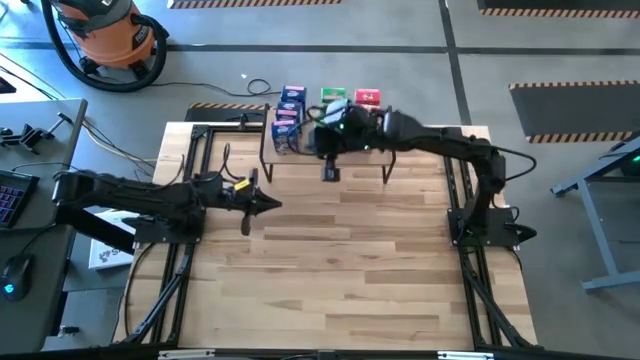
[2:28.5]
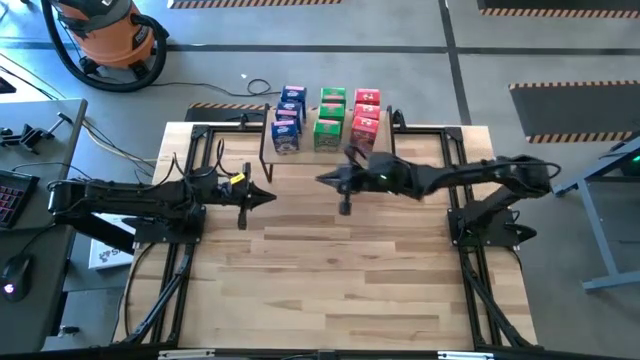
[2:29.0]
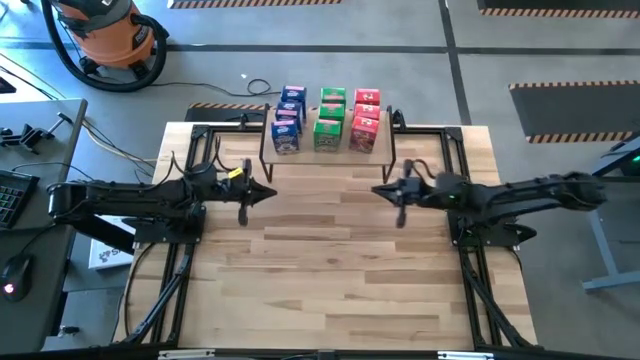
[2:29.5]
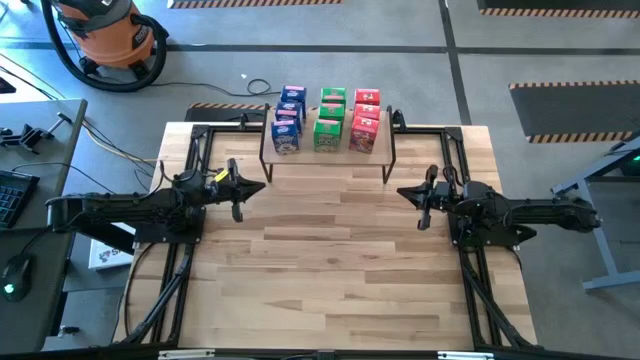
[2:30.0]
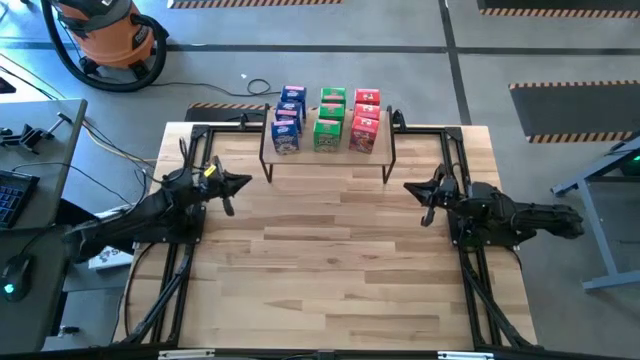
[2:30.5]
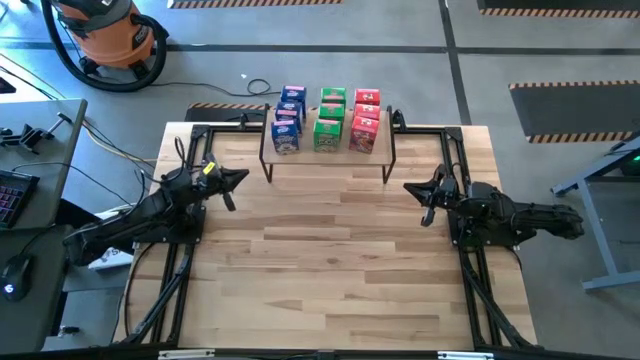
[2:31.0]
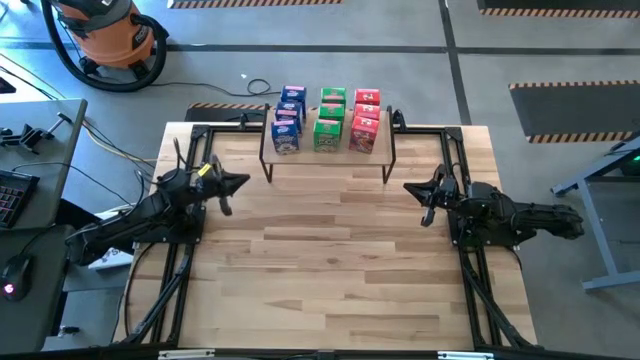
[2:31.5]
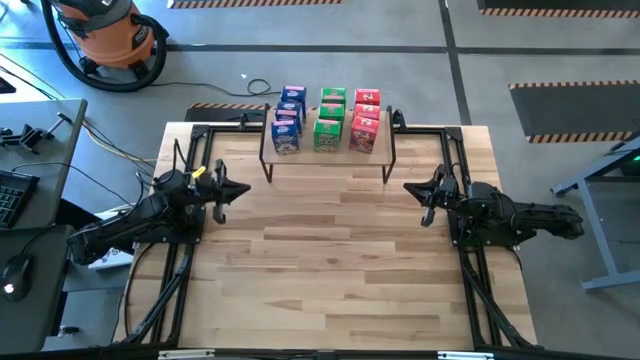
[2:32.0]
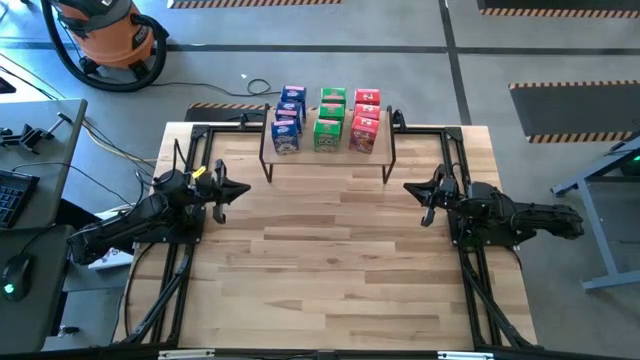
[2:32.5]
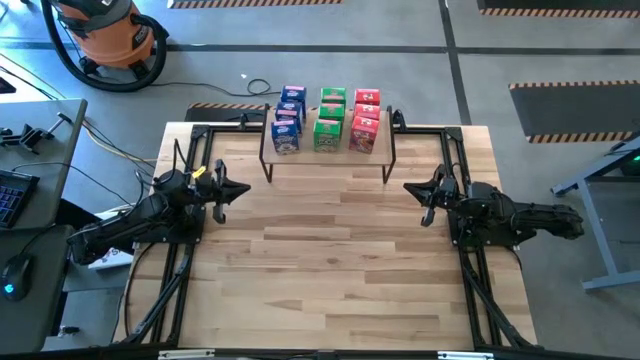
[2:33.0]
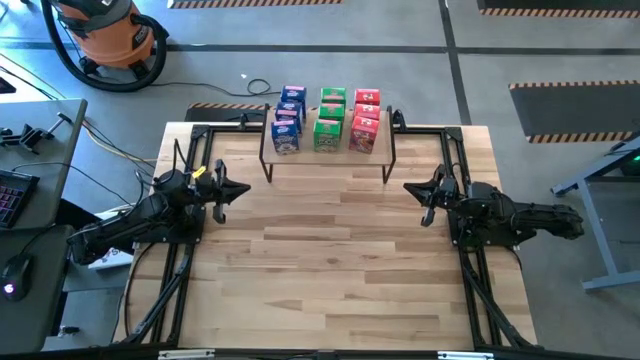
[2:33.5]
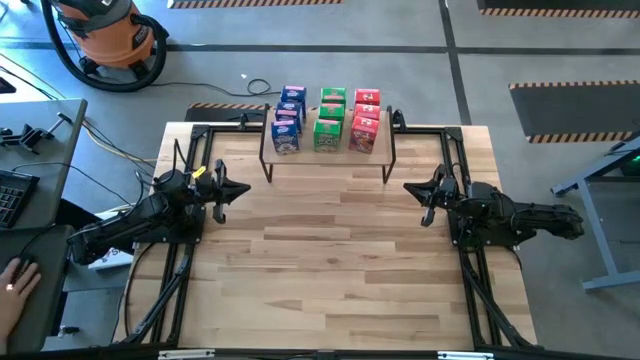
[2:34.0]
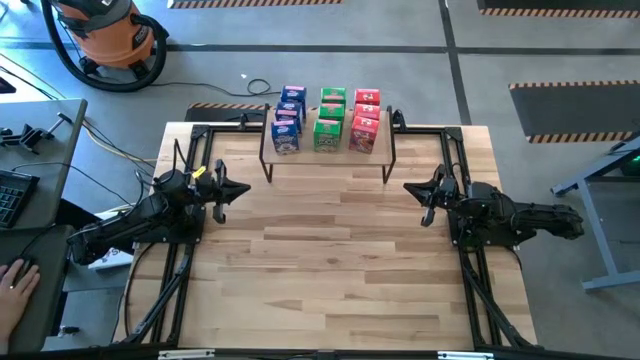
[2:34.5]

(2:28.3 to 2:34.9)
Task: Stack cereal on shelf
Return to Home Position

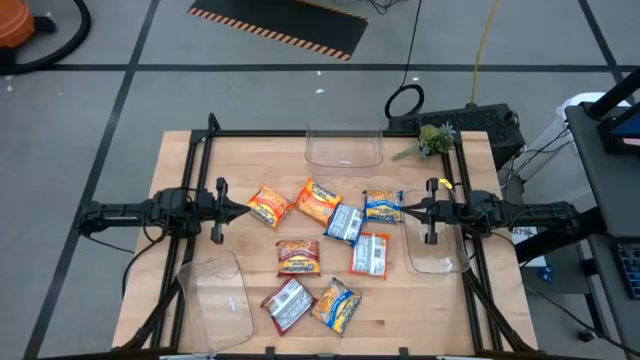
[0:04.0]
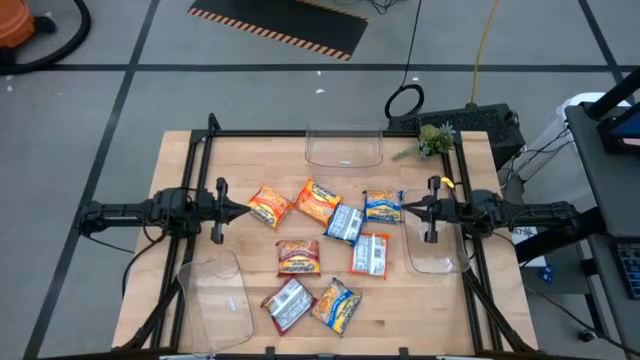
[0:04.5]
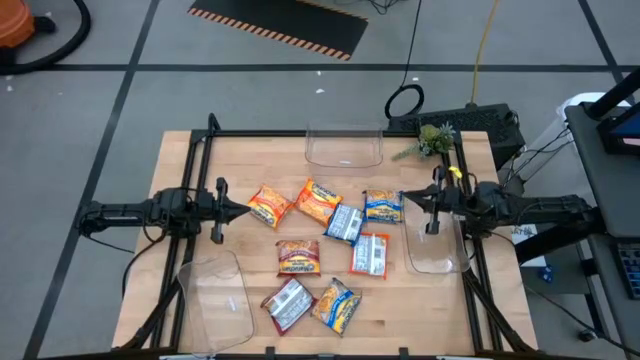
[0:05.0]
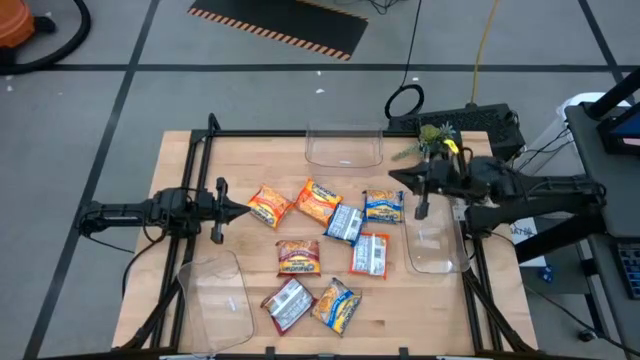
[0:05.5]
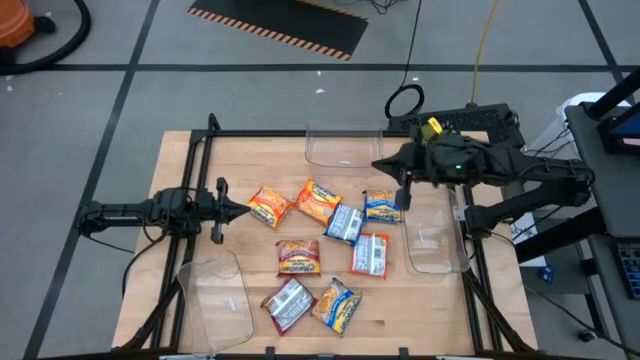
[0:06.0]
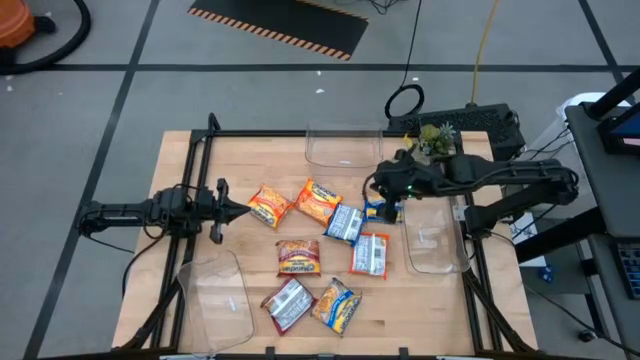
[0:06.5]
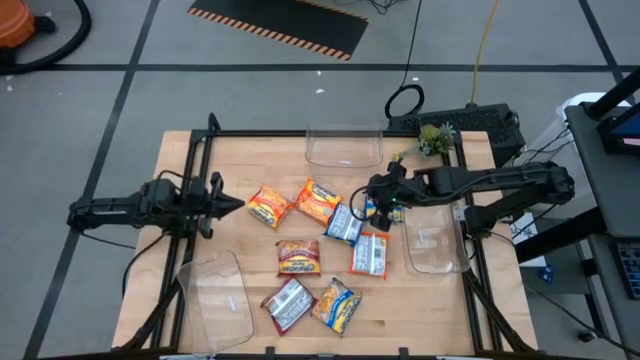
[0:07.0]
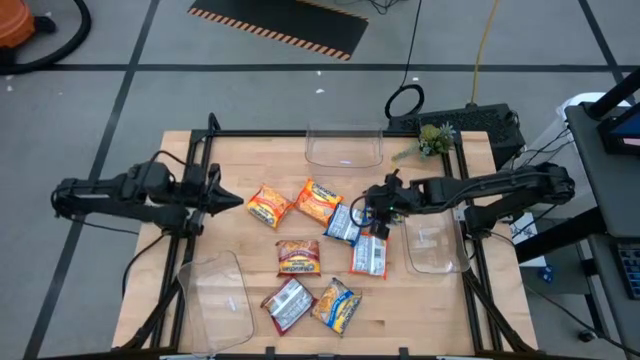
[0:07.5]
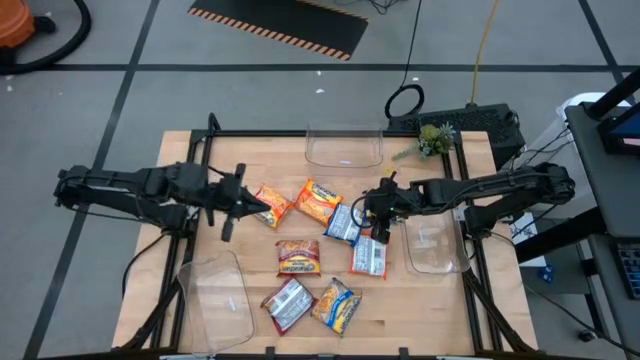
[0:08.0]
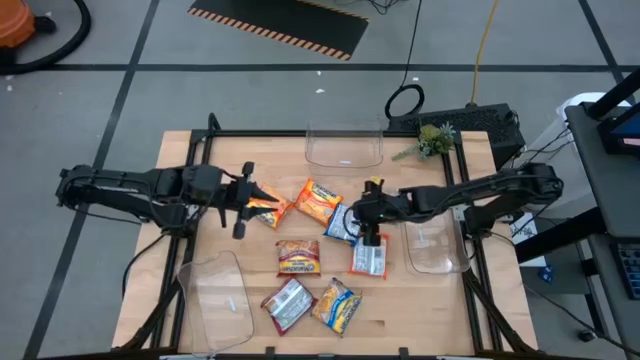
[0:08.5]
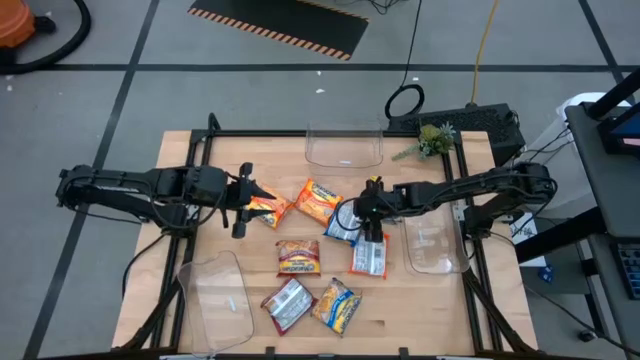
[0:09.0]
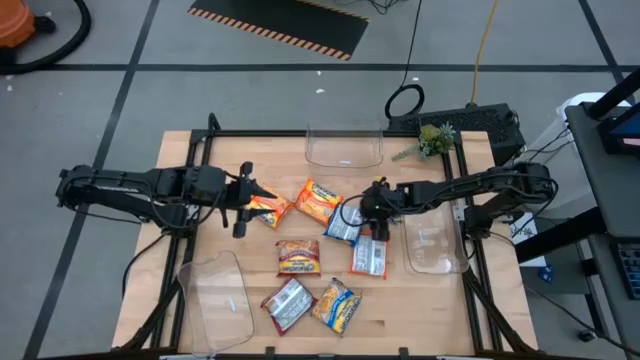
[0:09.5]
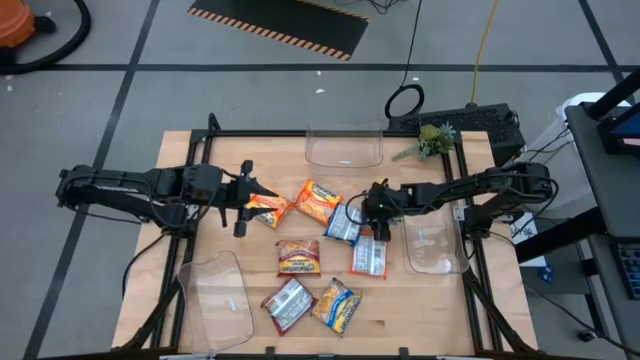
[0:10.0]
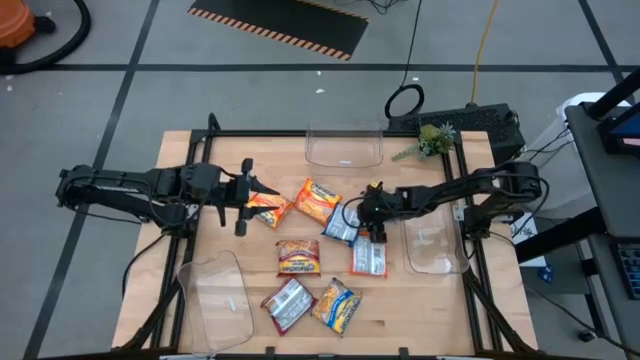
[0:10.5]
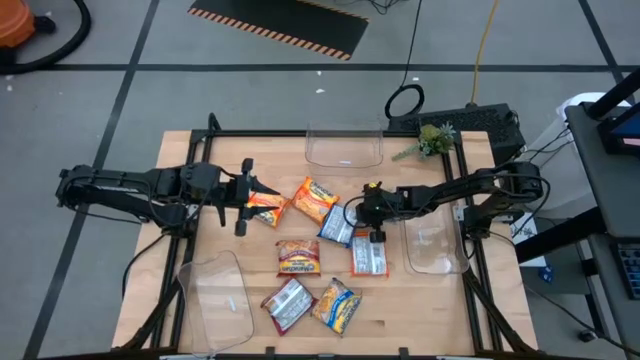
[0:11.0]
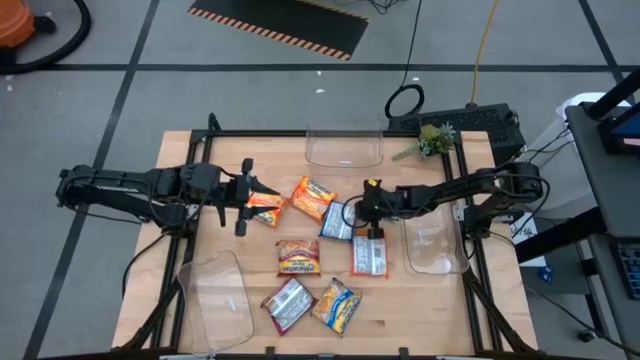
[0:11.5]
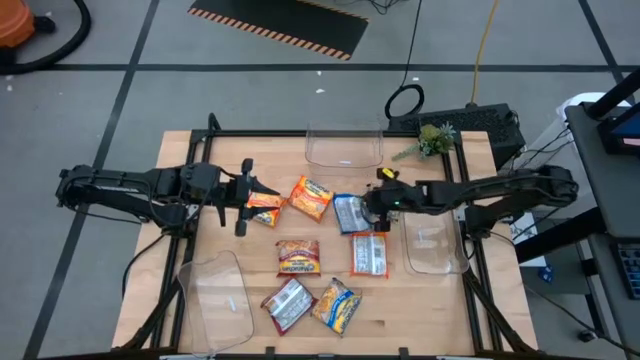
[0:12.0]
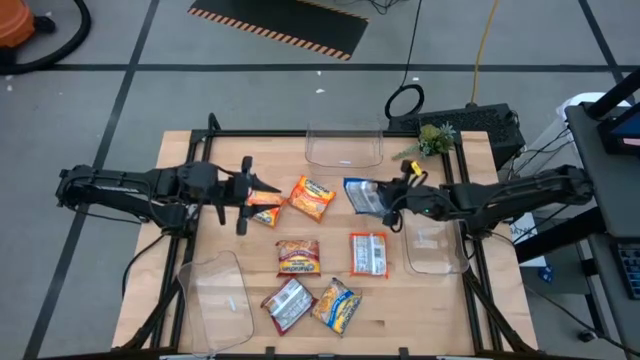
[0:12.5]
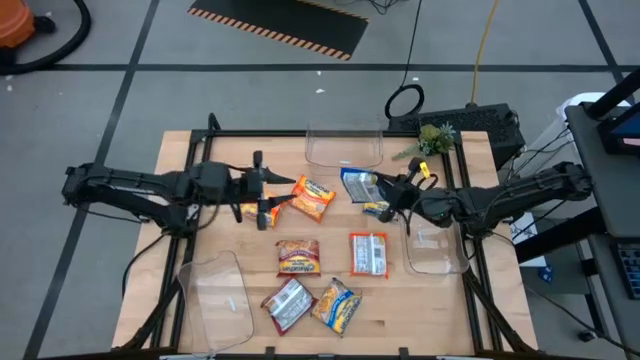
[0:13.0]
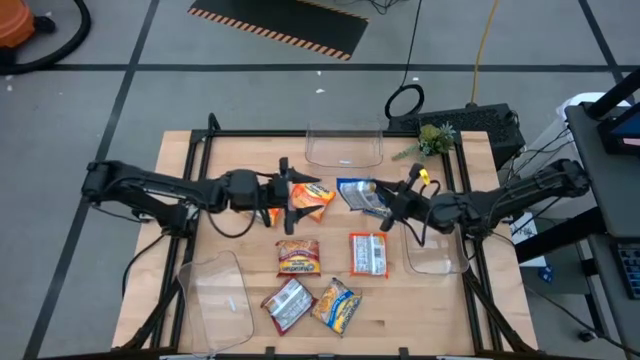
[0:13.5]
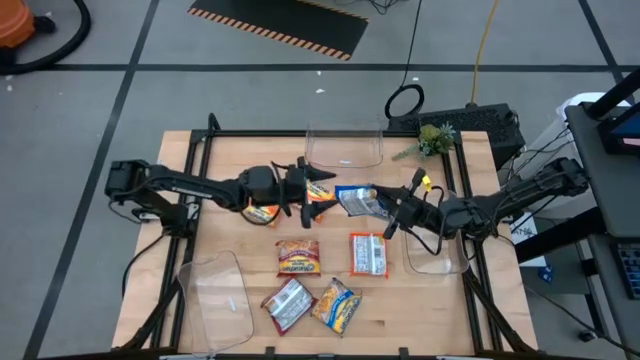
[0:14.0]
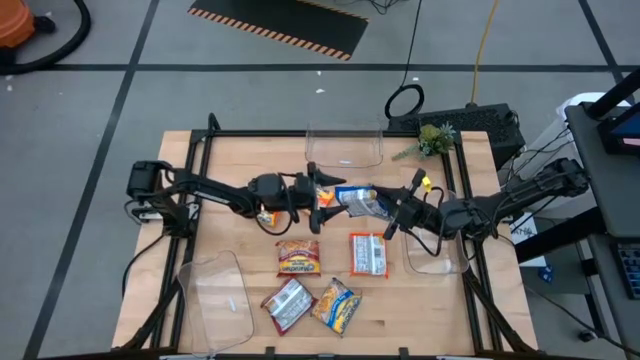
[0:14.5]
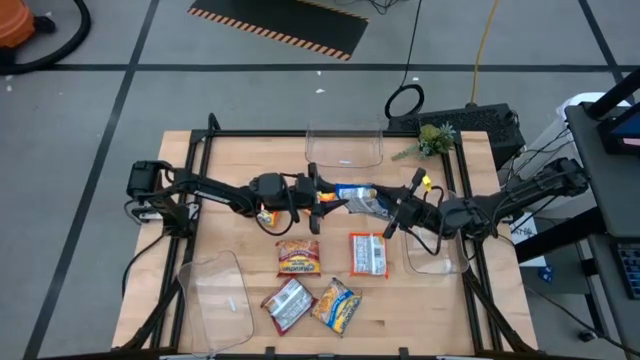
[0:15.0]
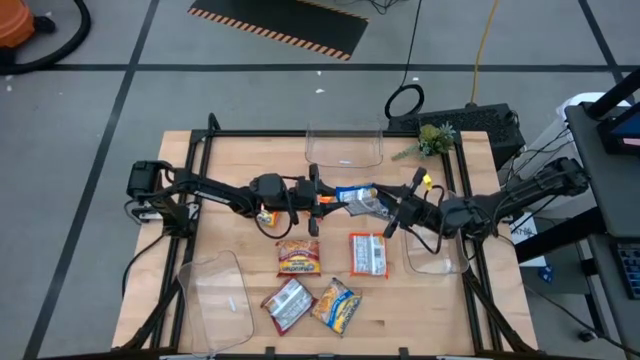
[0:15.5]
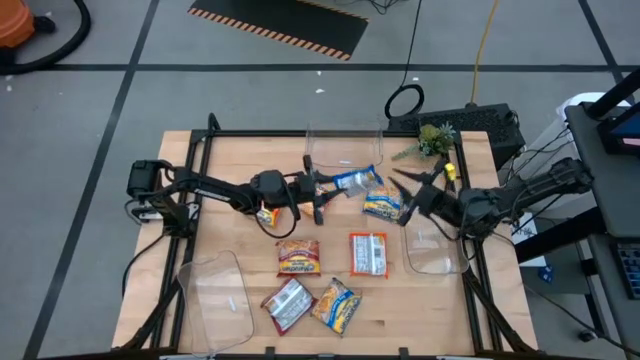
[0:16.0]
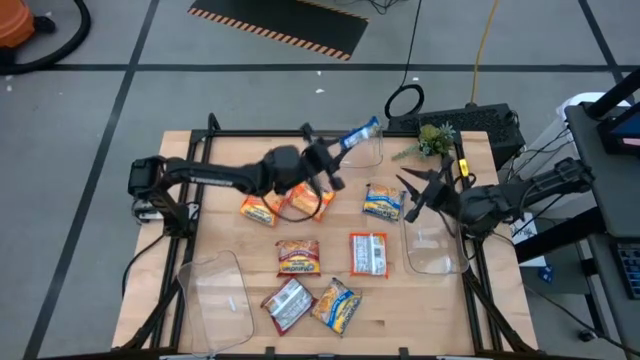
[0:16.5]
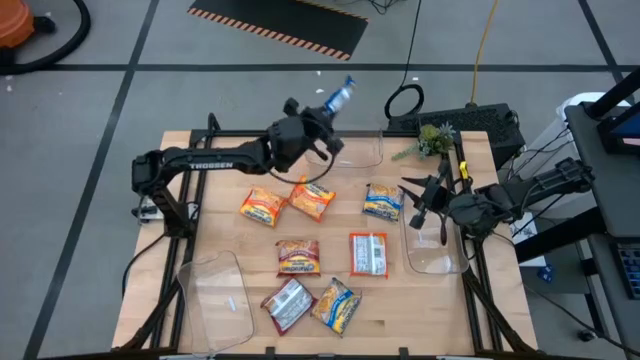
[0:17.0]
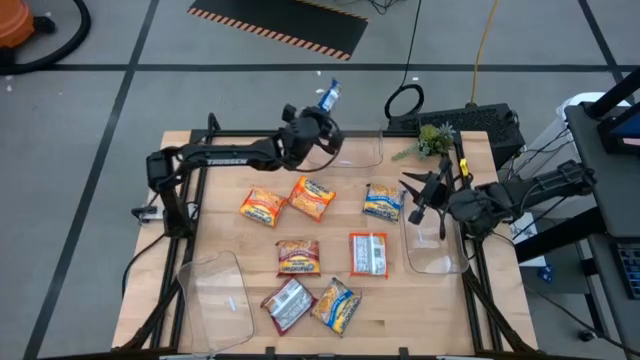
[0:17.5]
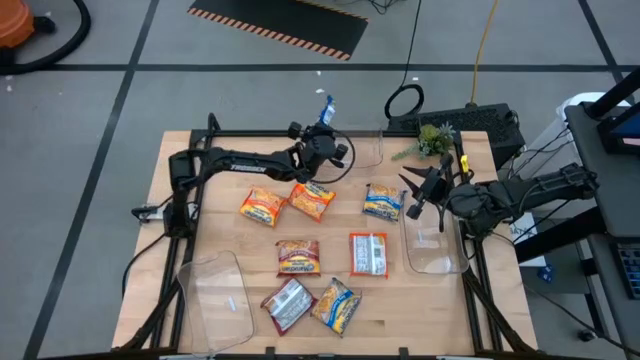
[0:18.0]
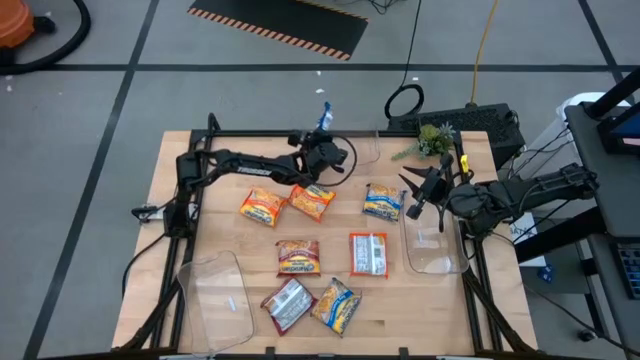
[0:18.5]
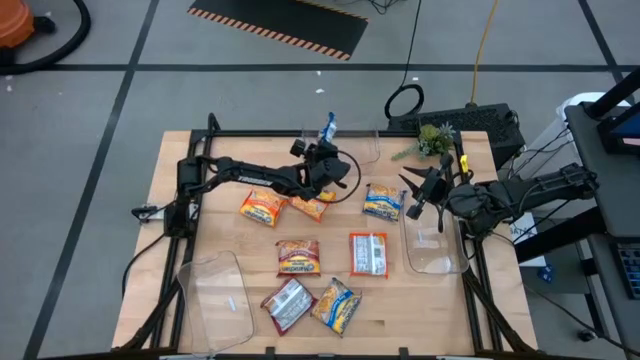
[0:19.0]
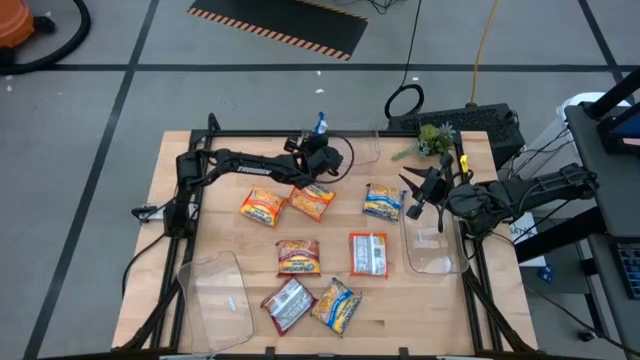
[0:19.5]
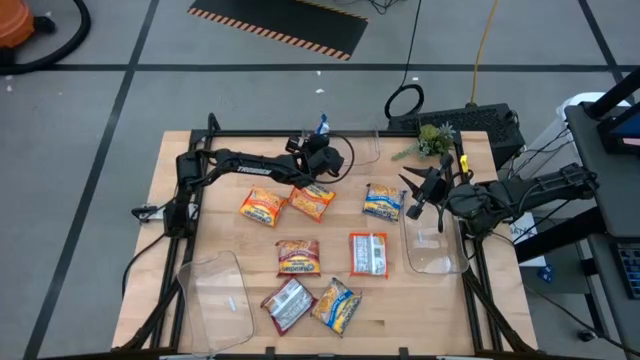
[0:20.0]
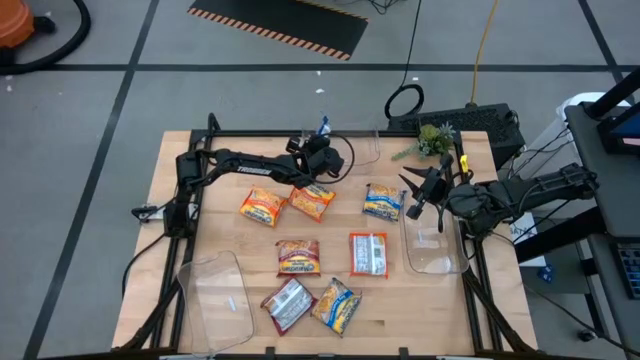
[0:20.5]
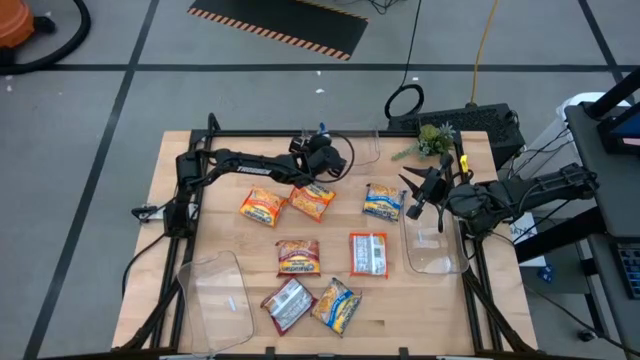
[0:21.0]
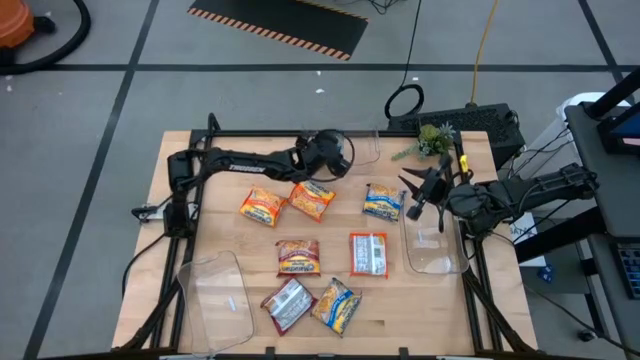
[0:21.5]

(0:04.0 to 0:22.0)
Task: Sort Maruchan noodles
Put the top blue noodle pack into the top transparent bin
